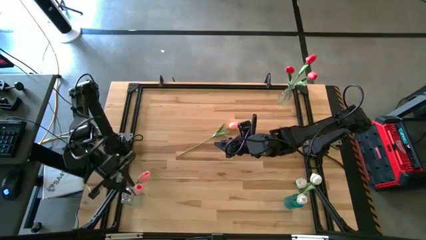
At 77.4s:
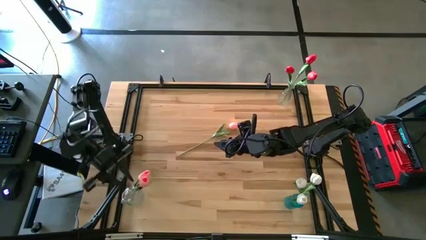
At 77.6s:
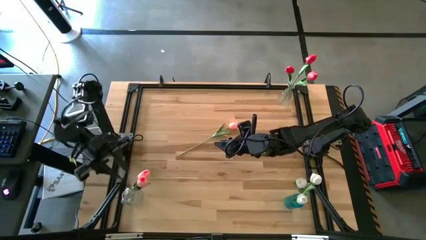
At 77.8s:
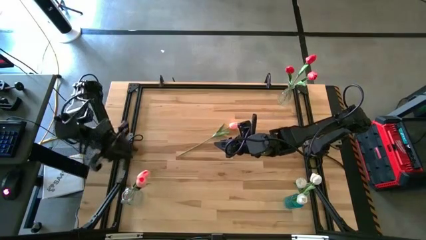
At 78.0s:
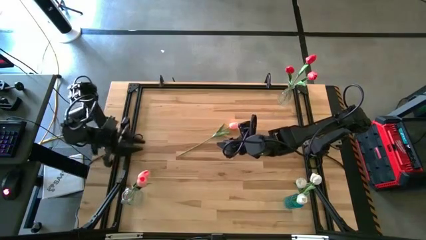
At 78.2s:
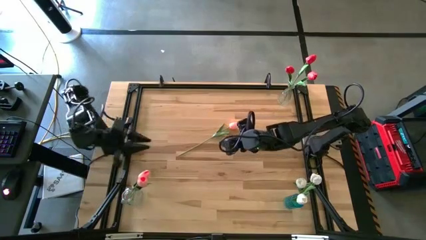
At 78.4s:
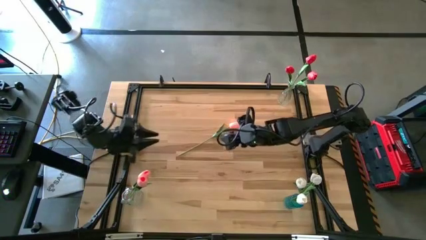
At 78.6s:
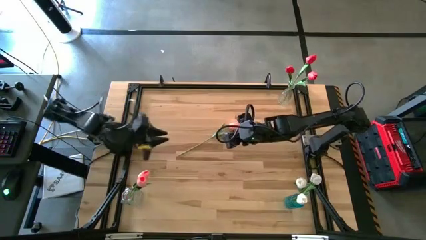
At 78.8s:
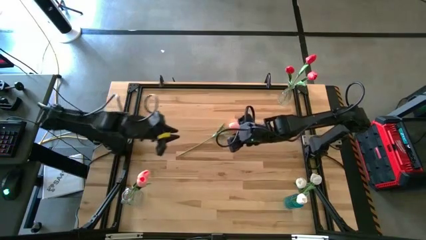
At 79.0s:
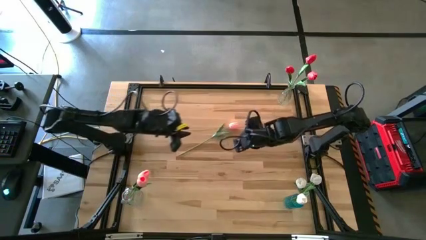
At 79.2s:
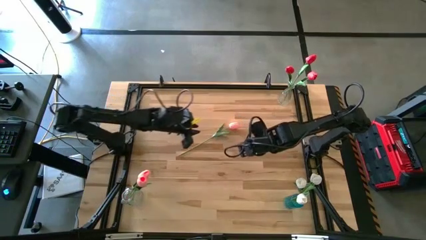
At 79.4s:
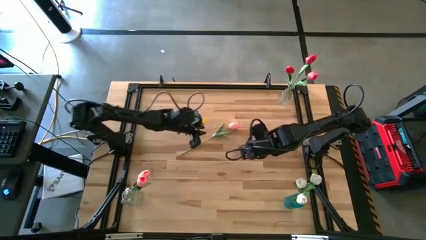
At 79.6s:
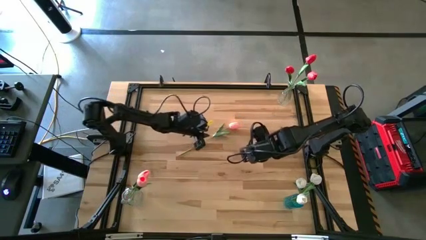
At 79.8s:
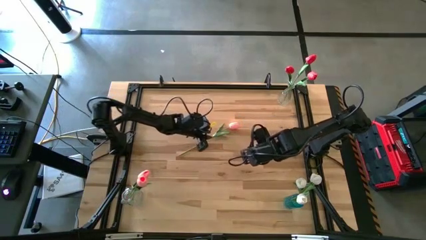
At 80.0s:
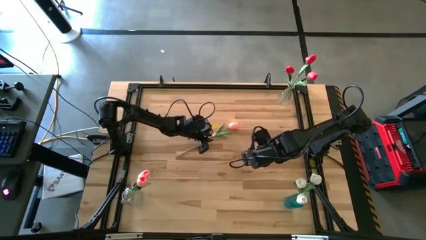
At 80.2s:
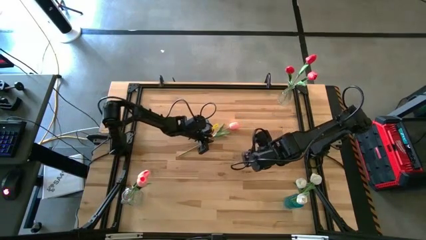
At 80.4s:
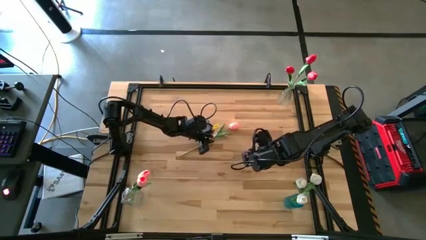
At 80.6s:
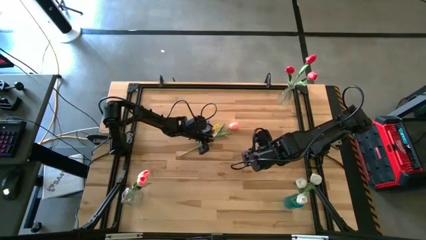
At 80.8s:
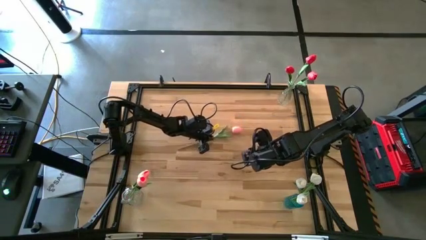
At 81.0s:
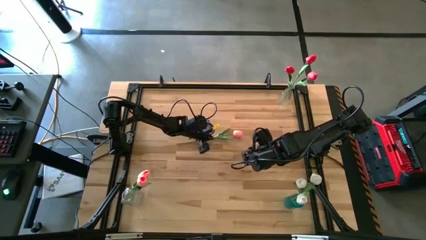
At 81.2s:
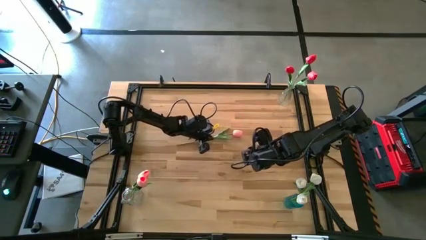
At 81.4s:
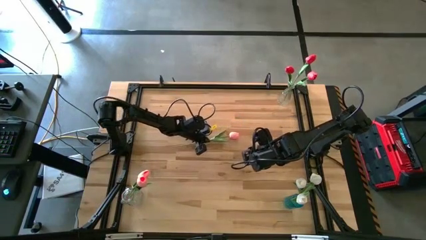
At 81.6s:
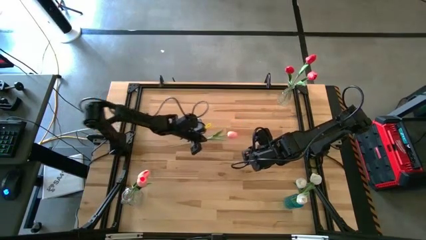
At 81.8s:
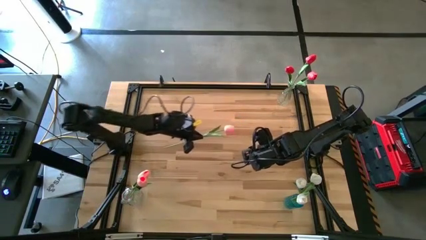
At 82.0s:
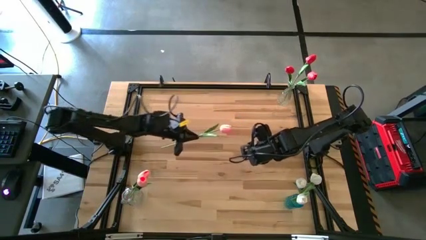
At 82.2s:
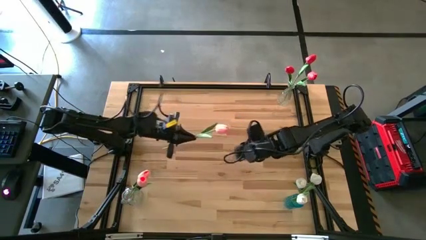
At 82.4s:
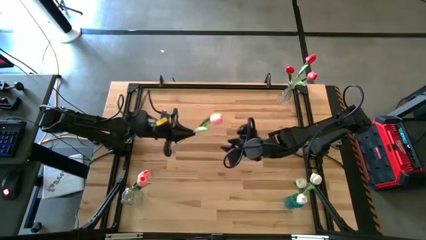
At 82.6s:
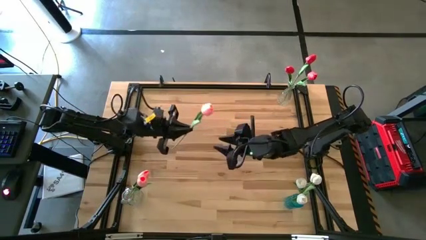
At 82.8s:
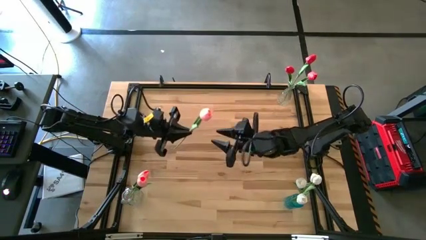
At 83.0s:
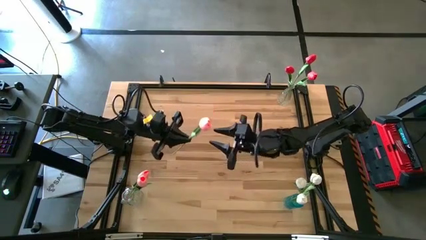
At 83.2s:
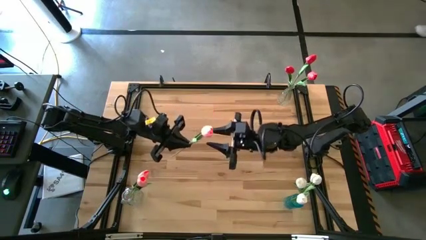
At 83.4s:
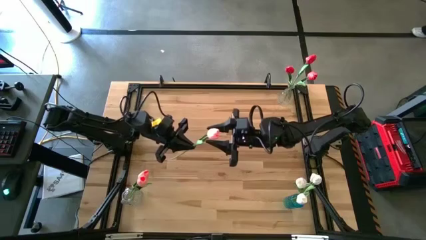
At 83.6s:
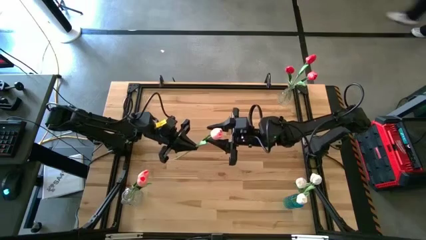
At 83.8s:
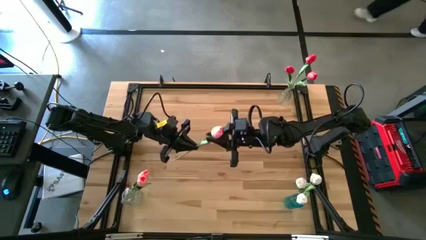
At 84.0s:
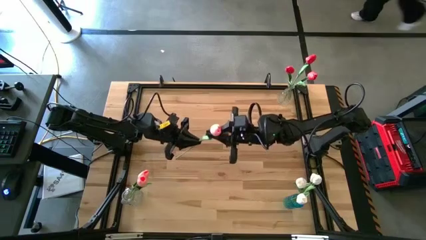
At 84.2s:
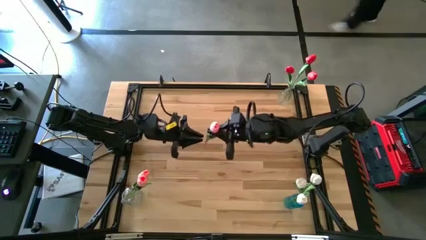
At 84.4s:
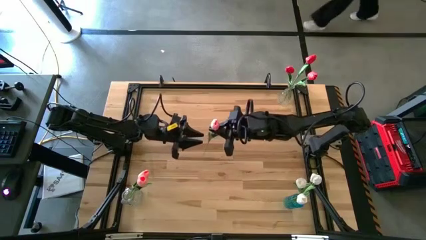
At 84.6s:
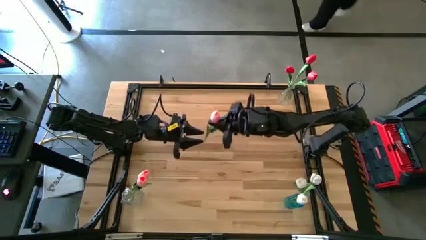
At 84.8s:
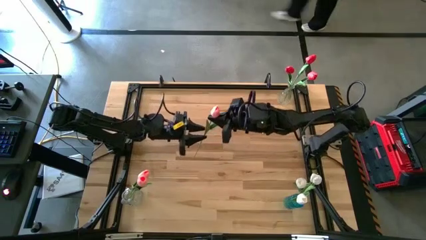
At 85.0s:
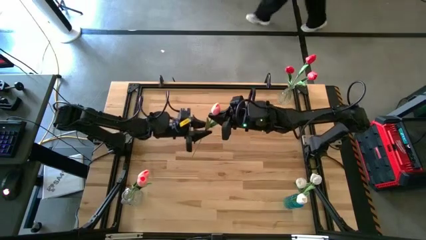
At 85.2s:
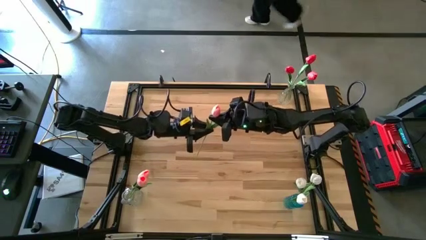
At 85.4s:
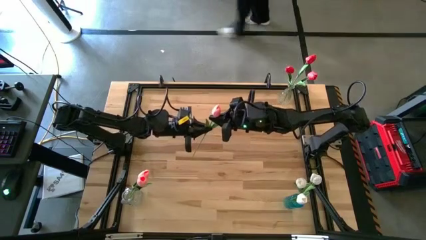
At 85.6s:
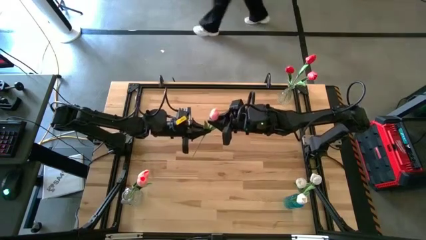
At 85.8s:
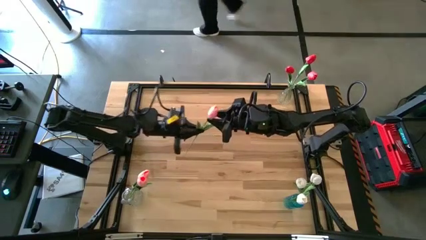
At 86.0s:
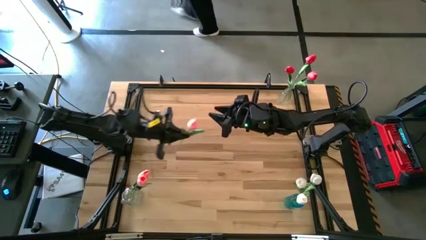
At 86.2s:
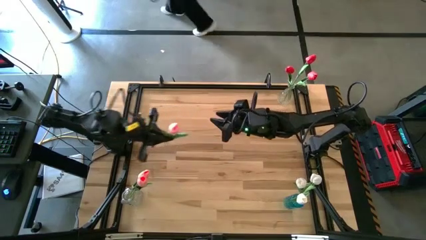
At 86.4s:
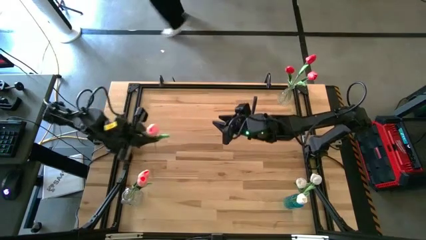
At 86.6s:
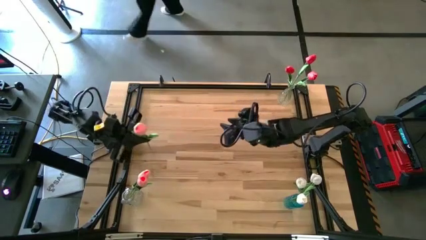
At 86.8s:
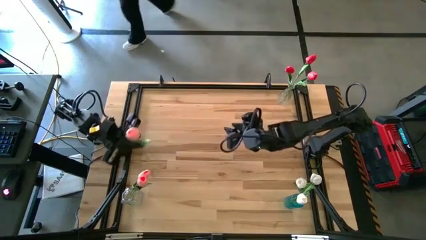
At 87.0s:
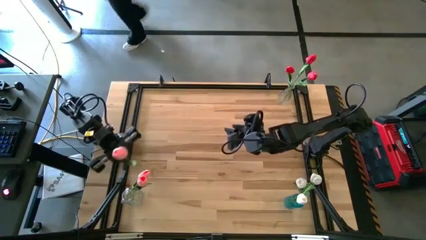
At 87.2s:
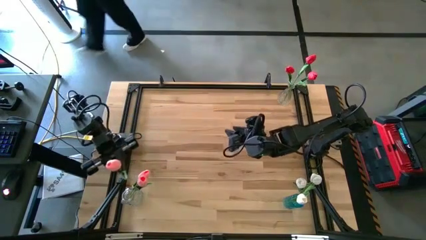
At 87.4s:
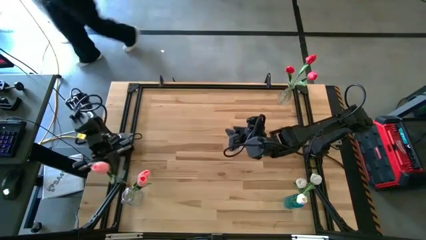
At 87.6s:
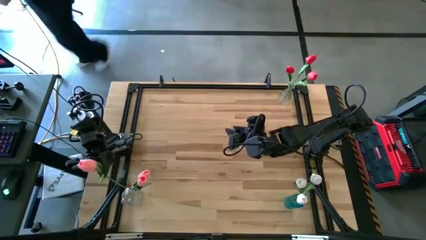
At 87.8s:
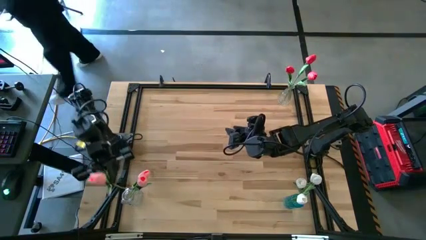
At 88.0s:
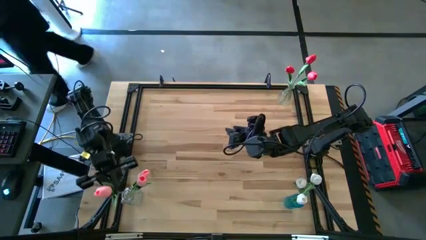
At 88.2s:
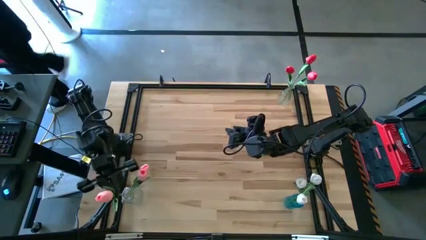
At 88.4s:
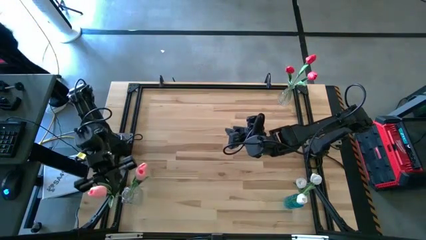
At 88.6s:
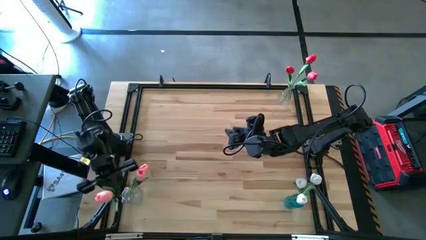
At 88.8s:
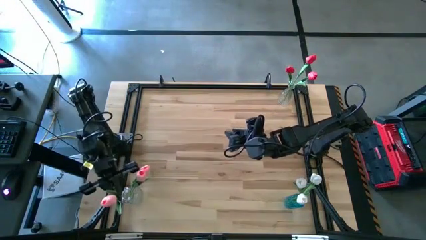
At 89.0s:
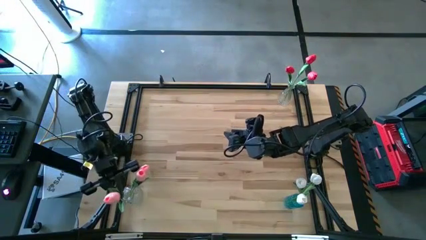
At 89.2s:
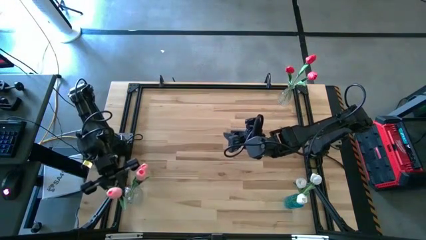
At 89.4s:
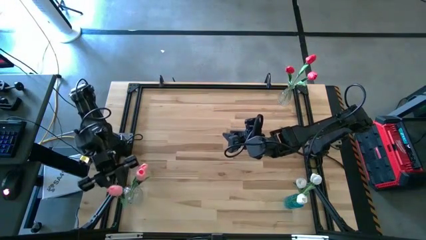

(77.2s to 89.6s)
Task: Sort flowers into vase by color
Put the pink flower into the bottom transparent vase

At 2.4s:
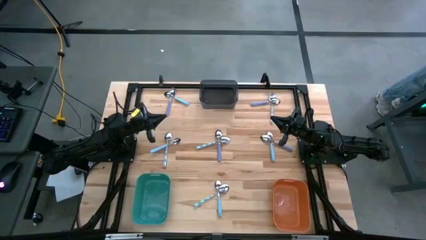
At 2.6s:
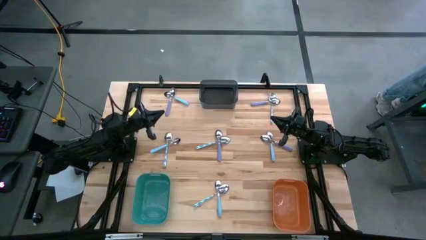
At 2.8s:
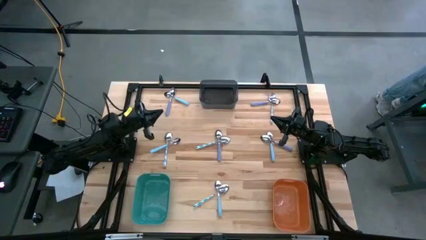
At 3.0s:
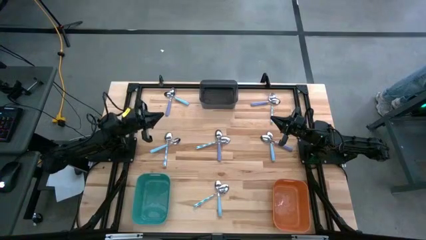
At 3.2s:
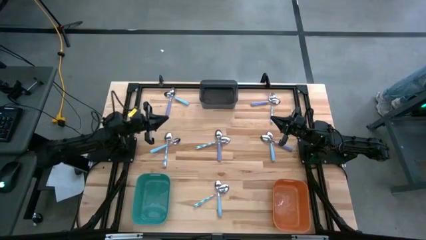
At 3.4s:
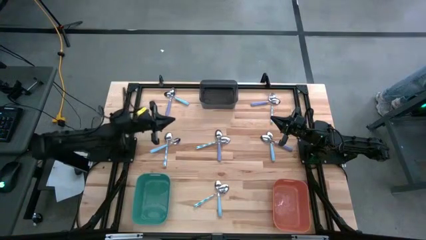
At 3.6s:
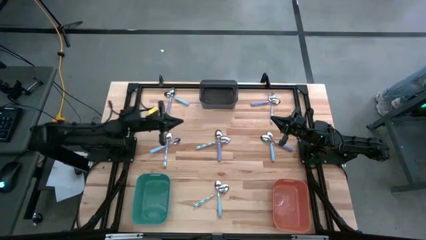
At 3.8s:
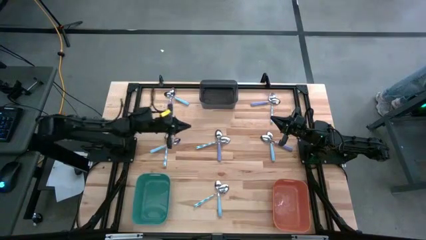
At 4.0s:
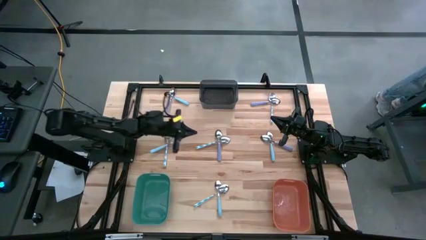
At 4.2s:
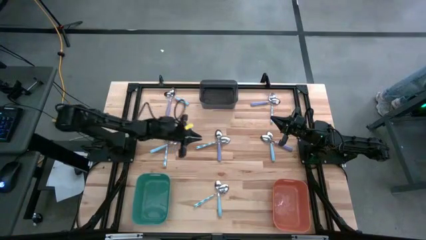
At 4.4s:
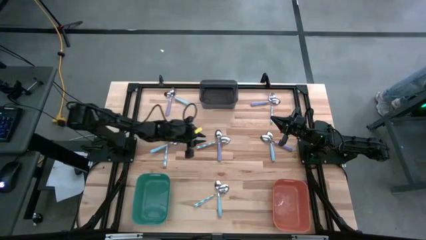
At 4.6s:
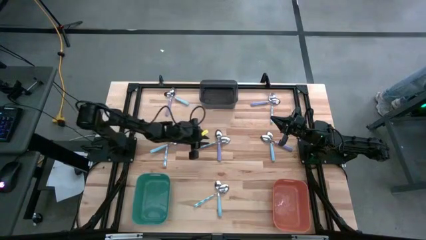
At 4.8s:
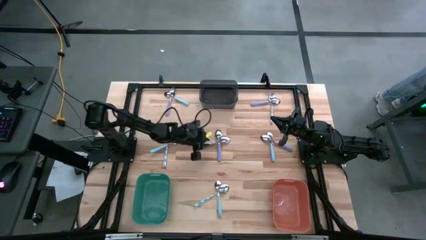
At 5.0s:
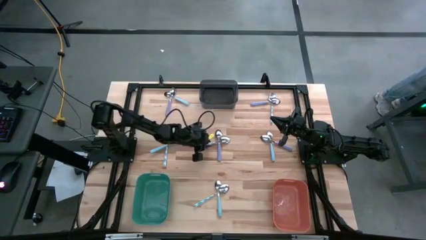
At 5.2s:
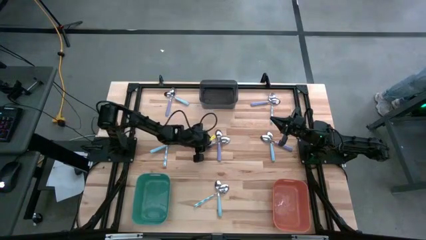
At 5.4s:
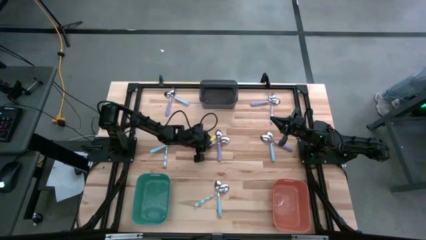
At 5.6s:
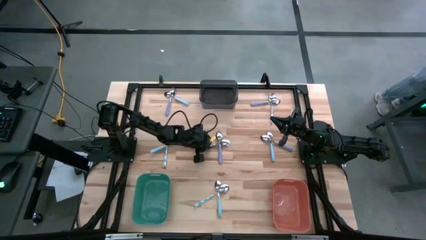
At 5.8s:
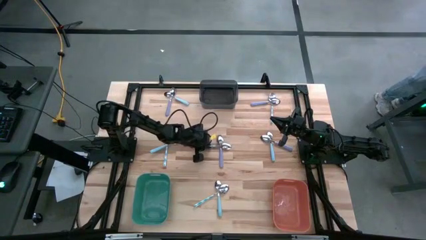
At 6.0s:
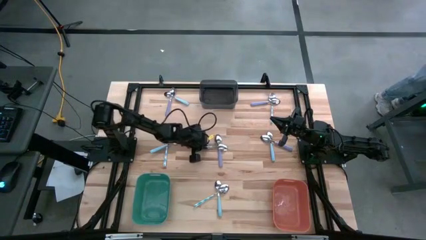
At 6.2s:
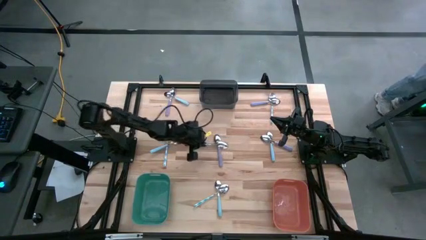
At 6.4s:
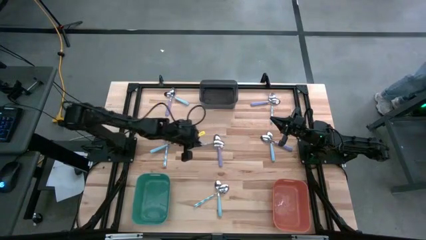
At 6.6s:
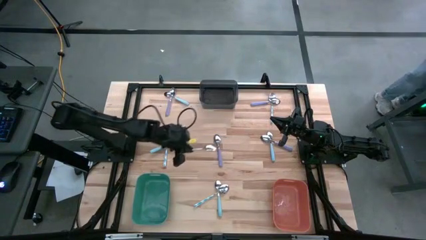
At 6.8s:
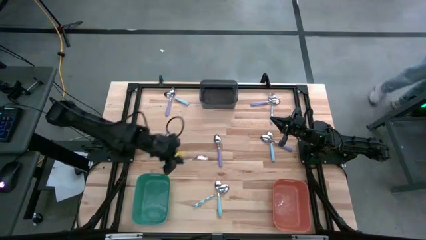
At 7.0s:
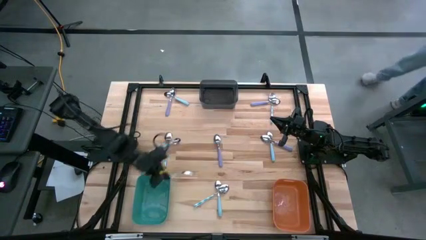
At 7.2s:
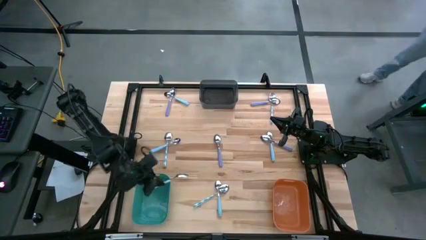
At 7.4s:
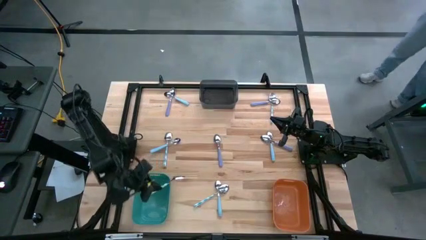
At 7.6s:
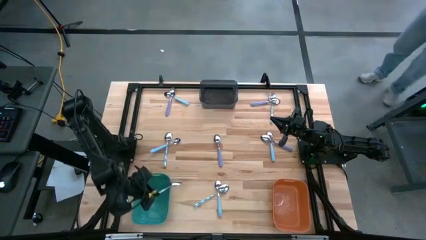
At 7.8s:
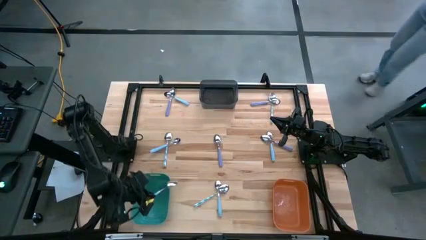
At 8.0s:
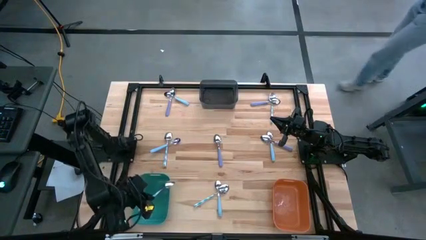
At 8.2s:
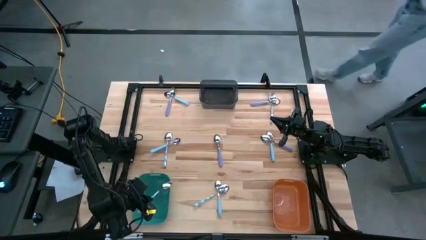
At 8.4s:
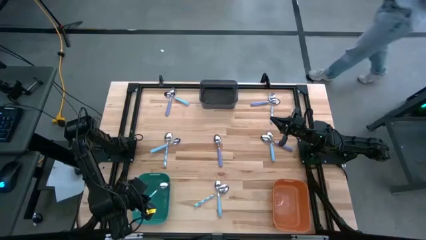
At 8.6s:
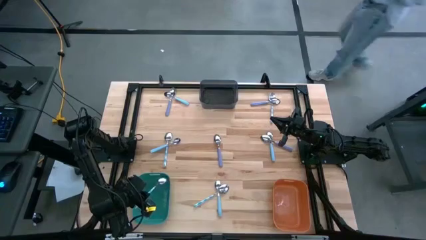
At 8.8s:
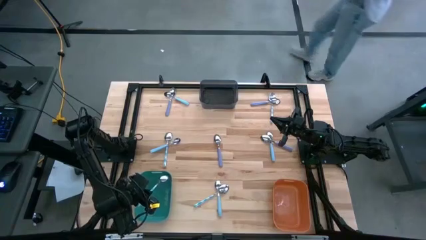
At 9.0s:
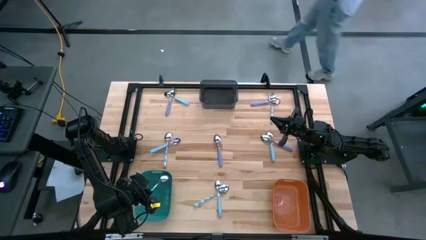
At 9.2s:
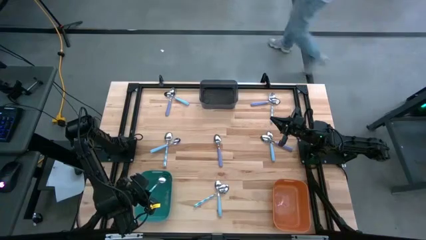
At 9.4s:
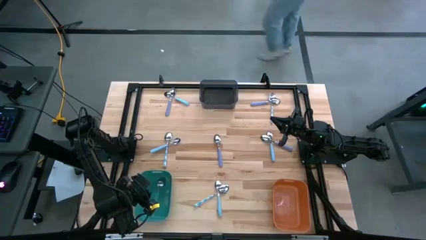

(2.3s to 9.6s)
Task: Sort silverware by color (type)
Put the white and blue spoon into the blue bin
